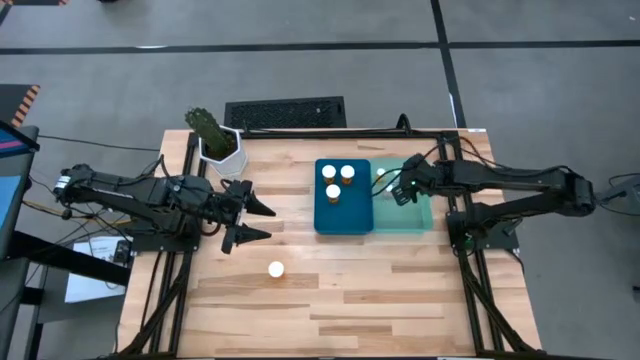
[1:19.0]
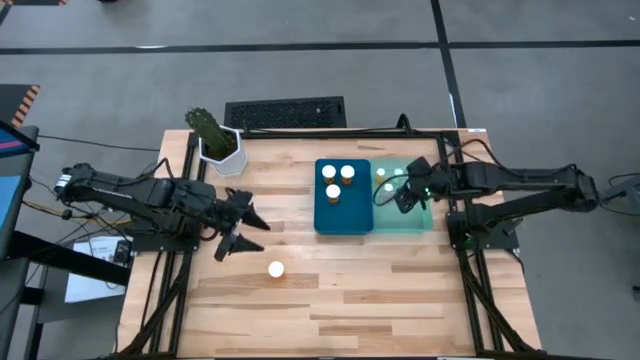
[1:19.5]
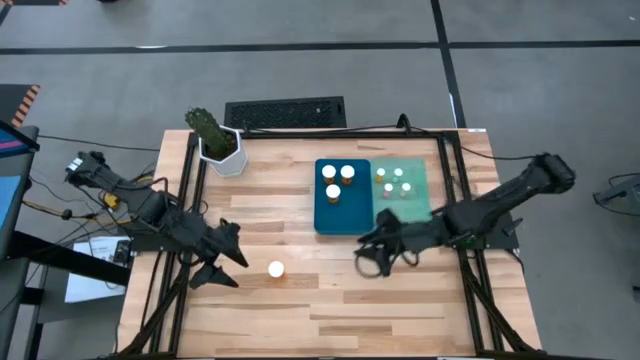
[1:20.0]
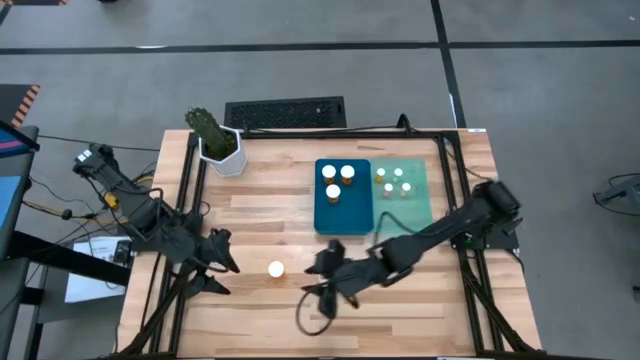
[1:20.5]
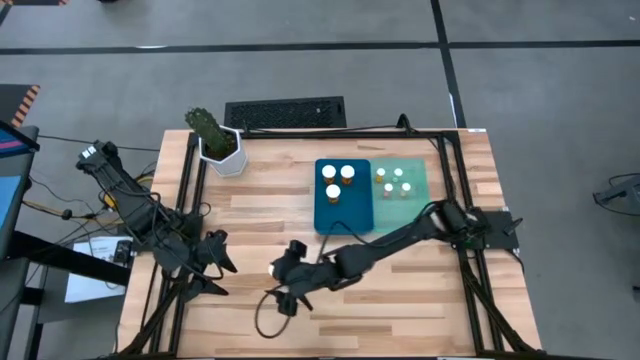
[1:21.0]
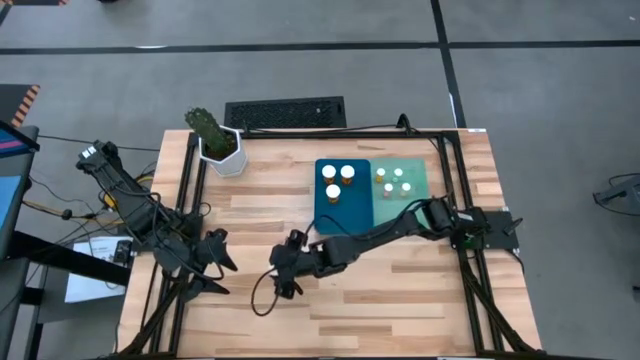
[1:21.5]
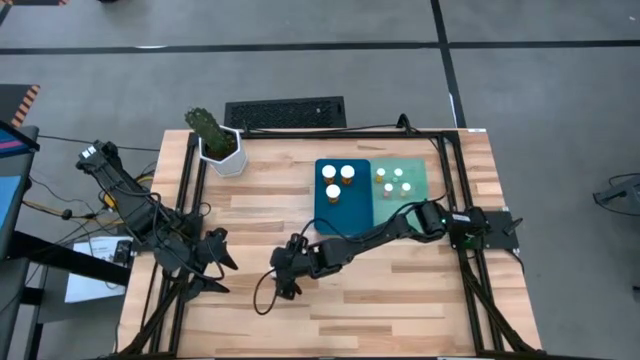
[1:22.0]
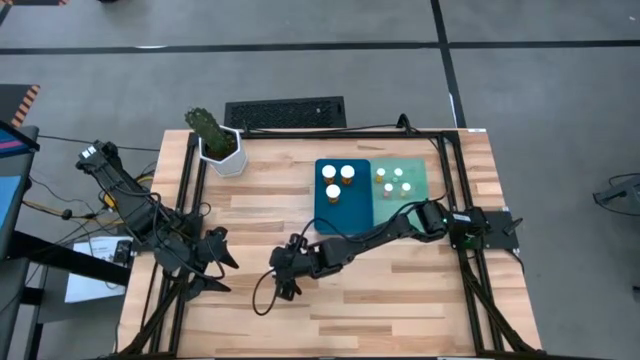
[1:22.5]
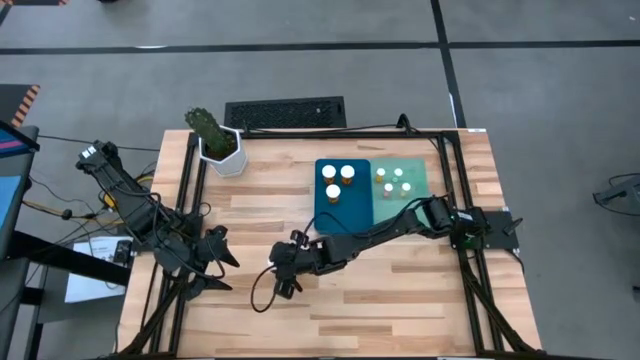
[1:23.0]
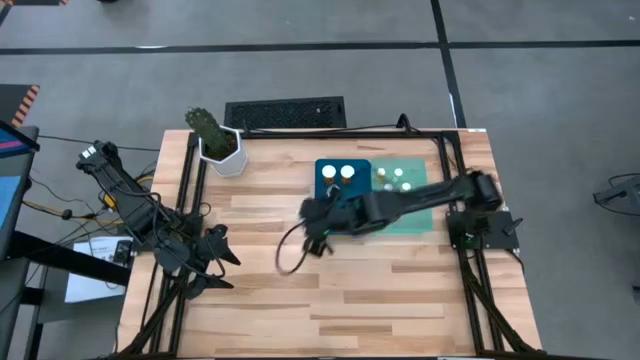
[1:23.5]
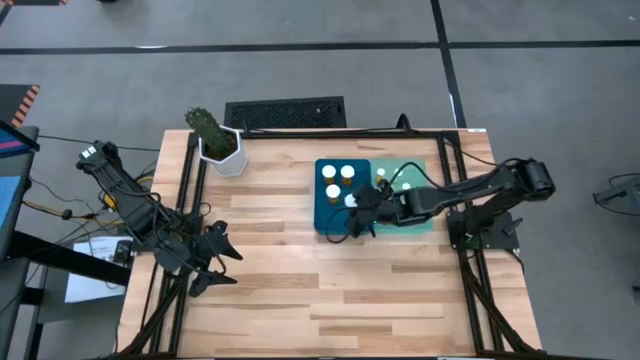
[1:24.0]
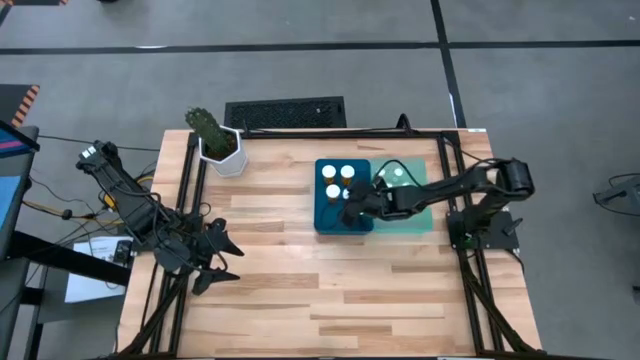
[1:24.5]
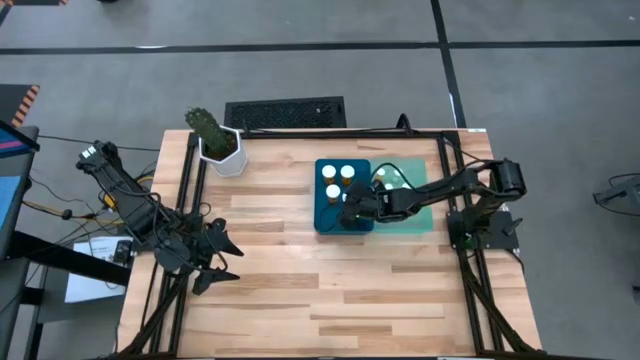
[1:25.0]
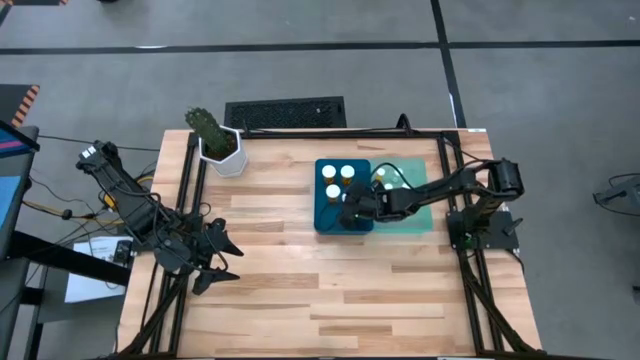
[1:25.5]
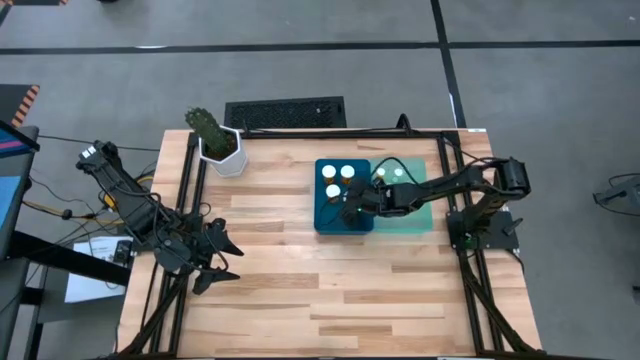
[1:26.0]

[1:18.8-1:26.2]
Task: Pick and place medicine bottles into bin by pill shape (circle, oval)
Put the large orange pill bottle into the blue bin

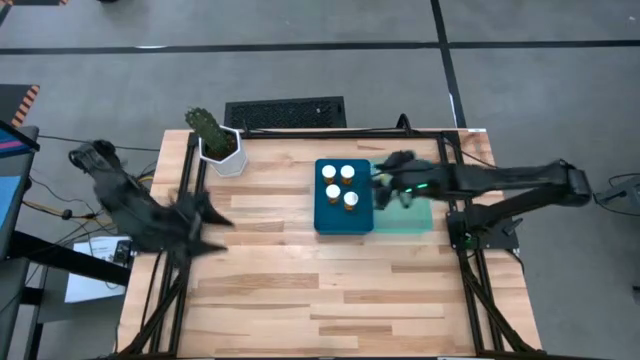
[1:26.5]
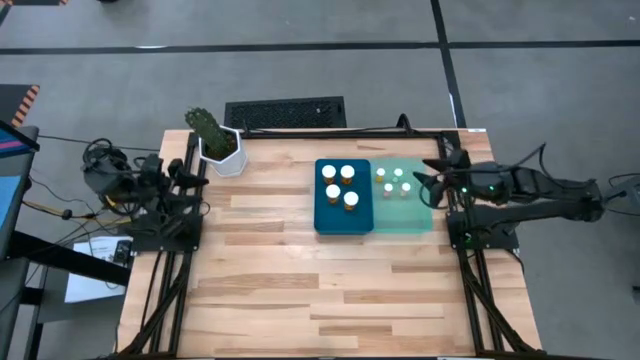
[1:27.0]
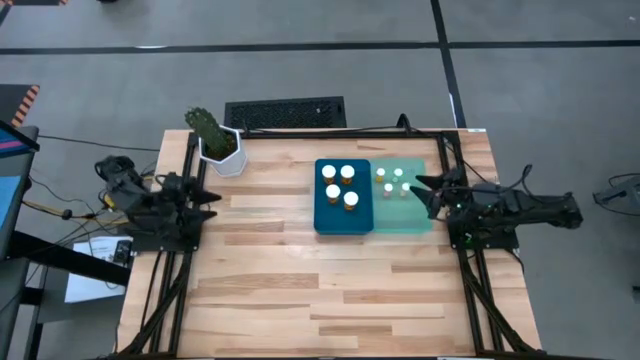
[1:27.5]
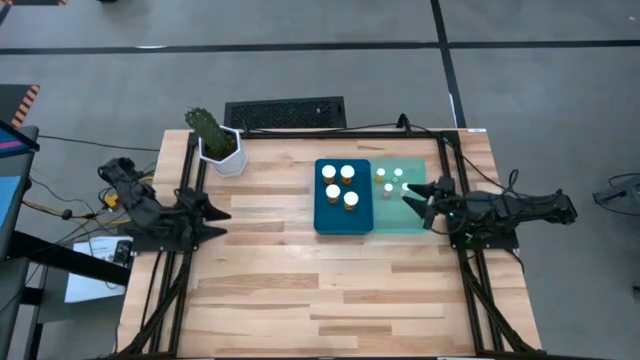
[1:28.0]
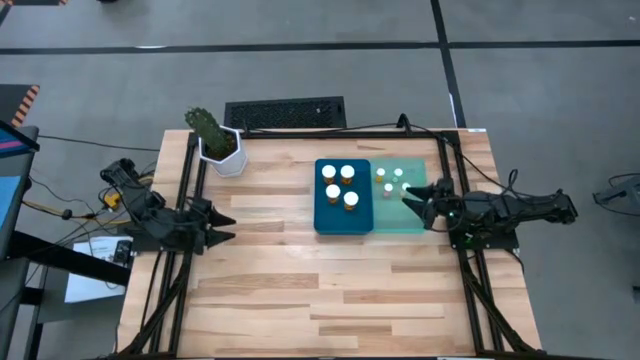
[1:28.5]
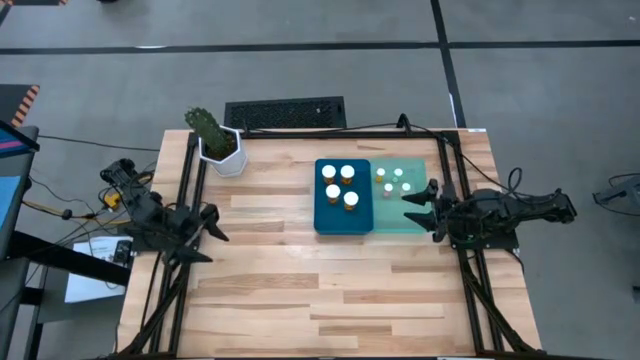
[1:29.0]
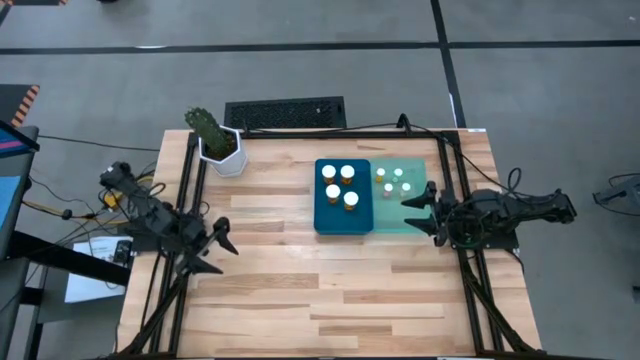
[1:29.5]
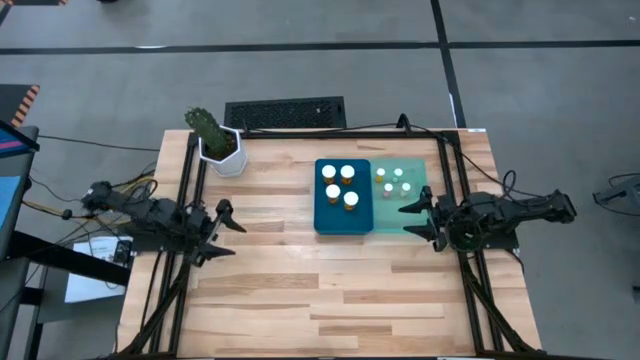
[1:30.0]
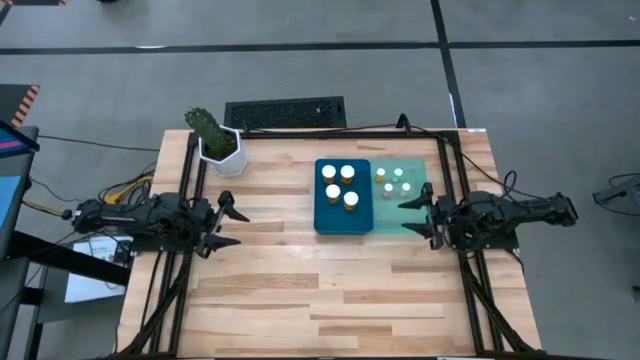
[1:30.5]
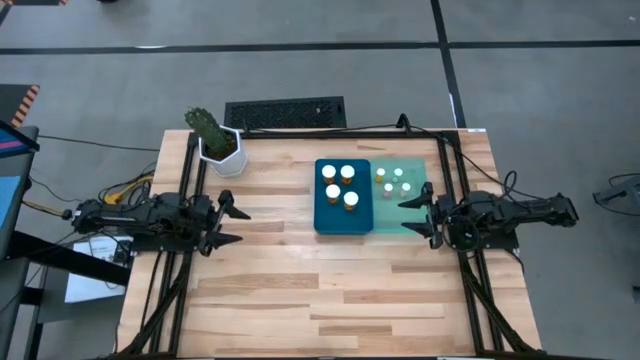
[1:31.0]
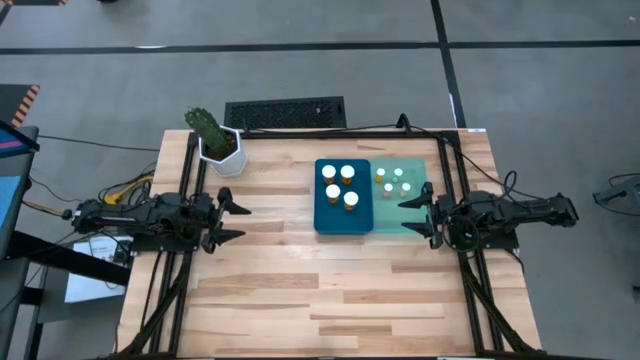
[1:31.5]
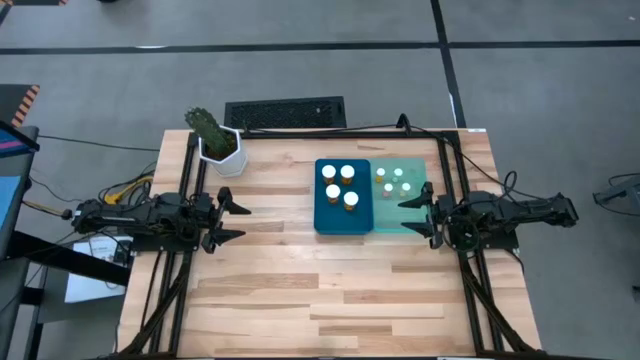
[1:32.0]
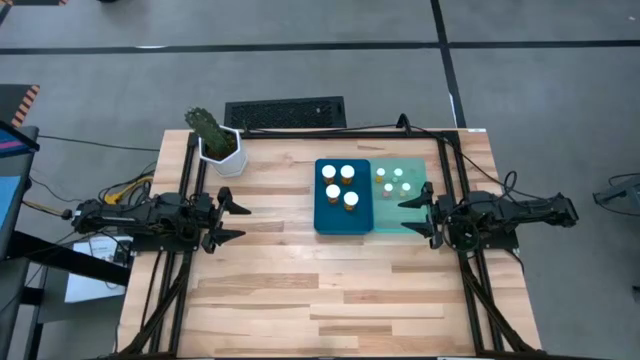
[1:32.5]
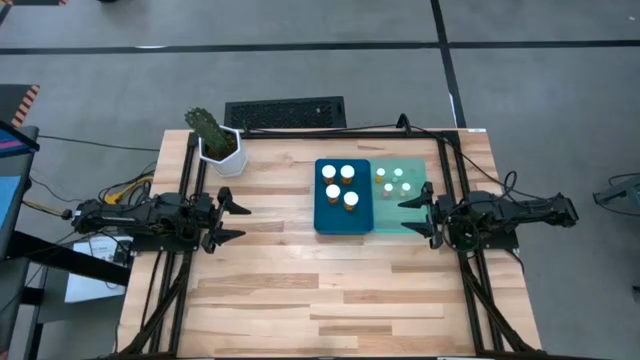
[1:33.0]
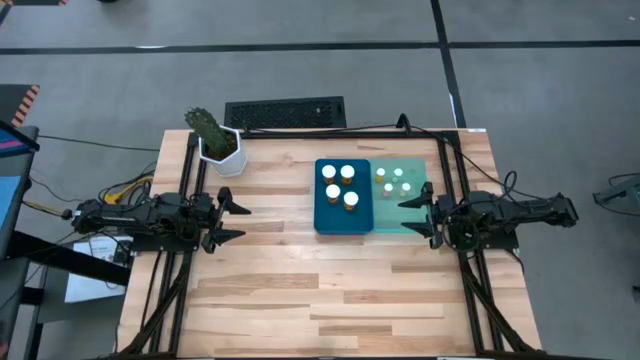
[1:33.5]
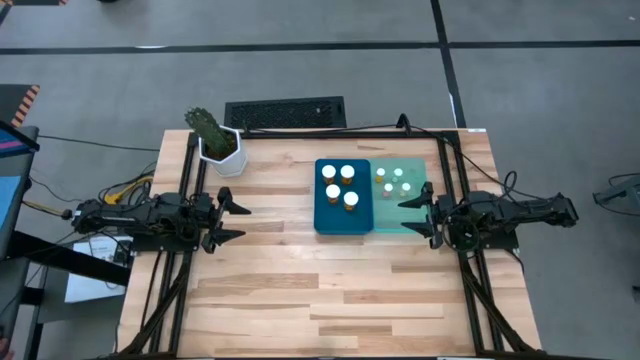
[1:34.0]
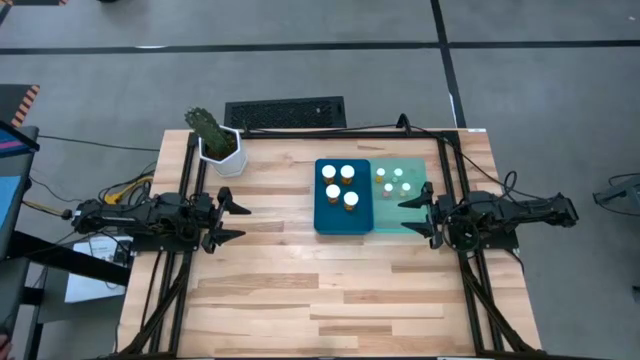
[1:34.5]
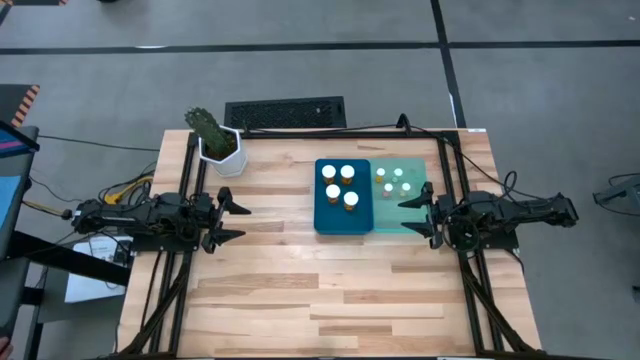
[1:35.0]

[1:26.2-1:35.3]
Return to Home Position

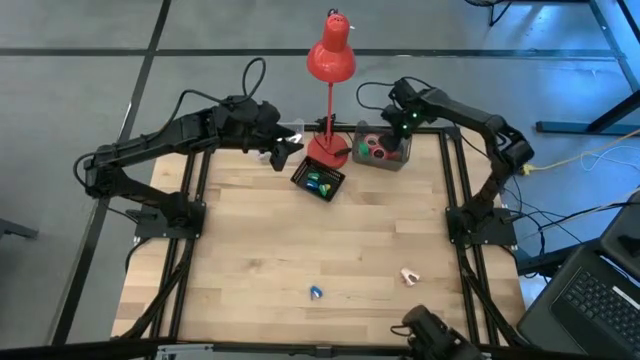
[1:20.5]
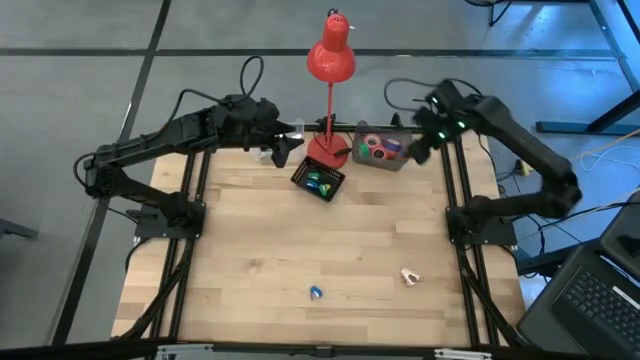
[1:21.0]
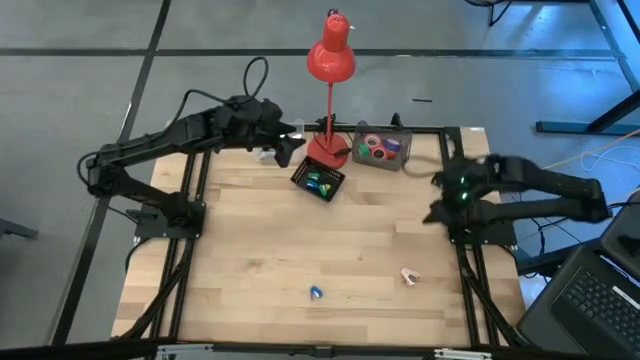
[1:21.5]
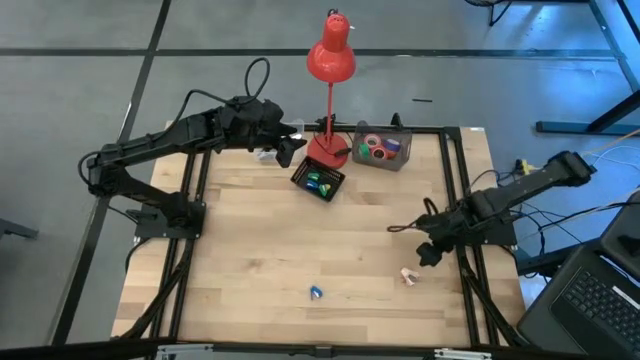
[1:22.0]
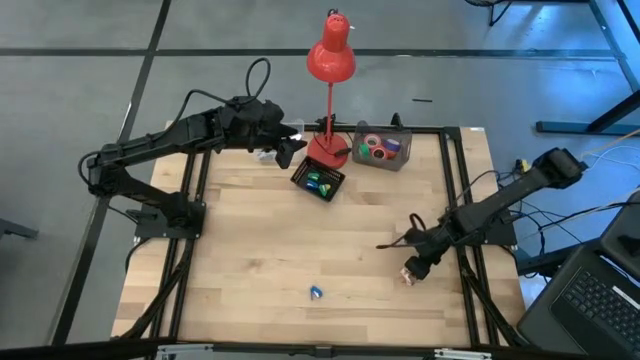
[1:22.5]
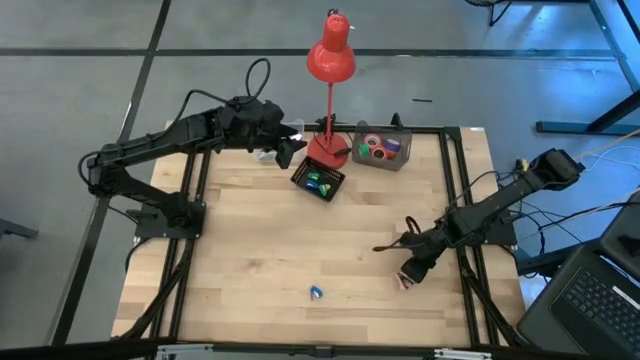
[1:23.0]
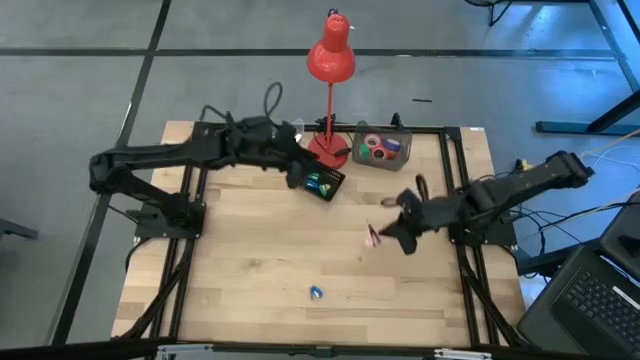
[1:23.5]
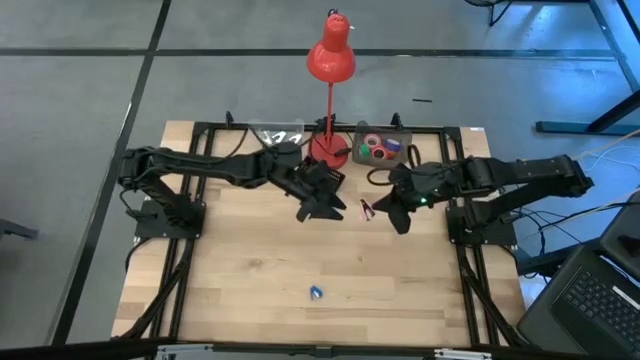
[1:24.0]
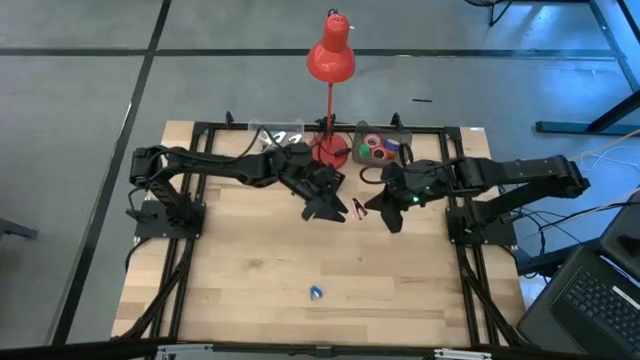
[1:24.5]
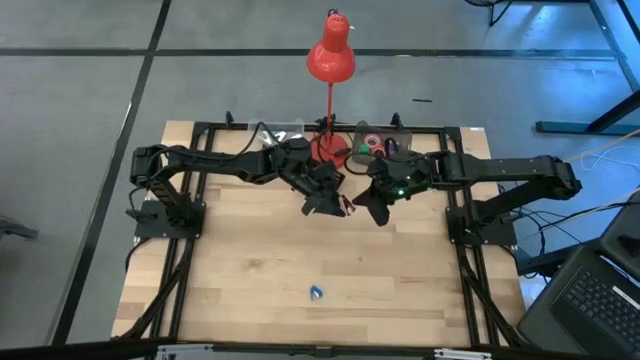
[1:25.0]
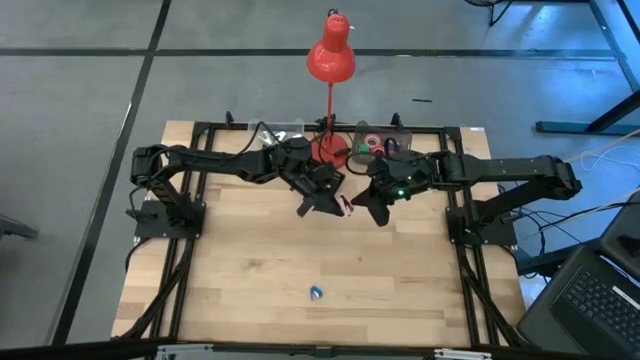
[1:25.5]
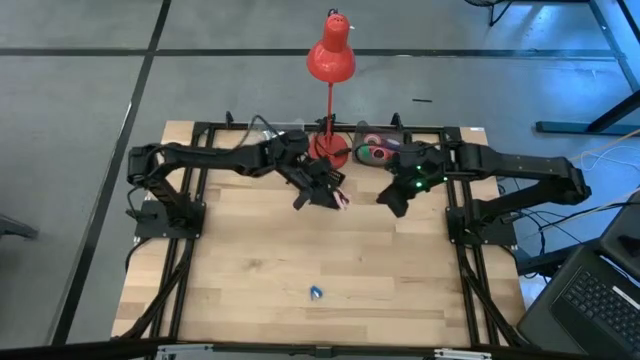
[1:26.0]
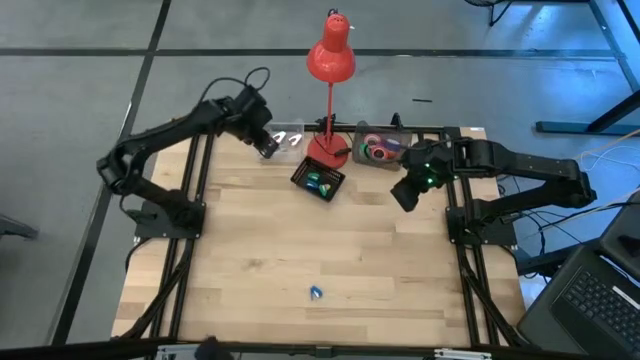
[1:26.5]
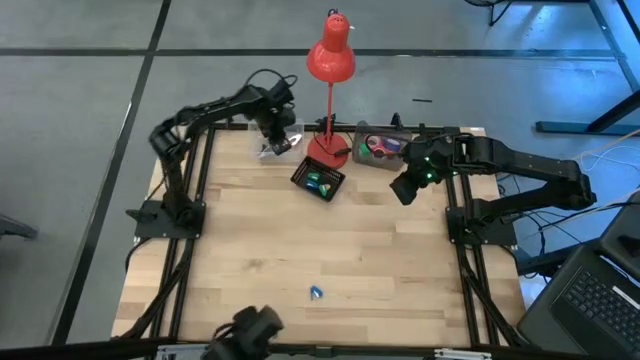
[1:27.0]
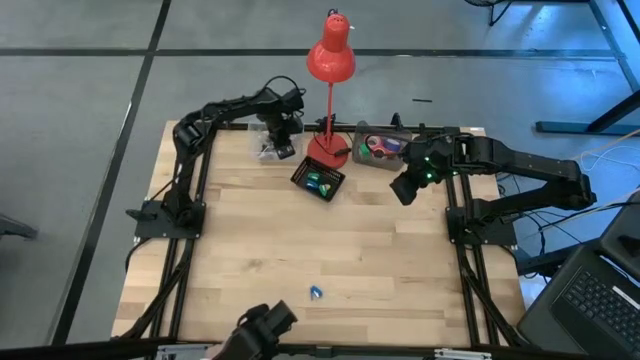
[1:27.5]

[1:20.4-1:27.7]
Task: Pick and place Stapler, Stapler remover, tape
Put the pink staple remover into the transparent bin
